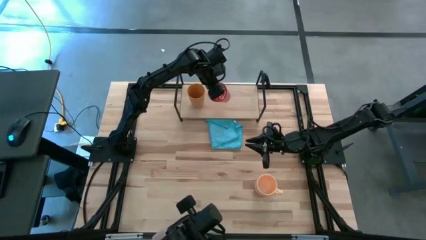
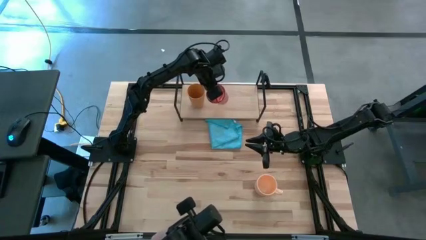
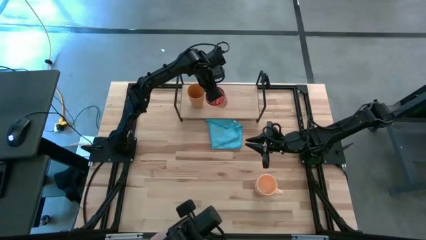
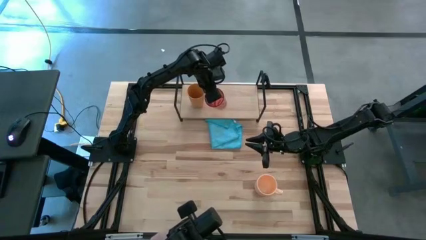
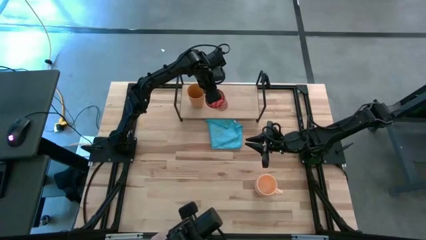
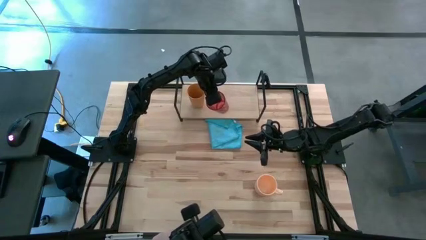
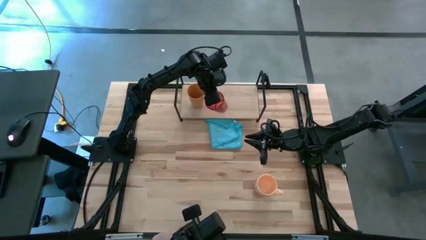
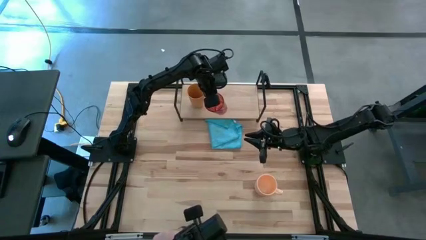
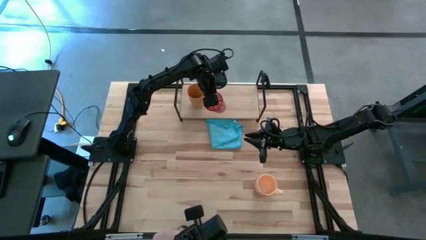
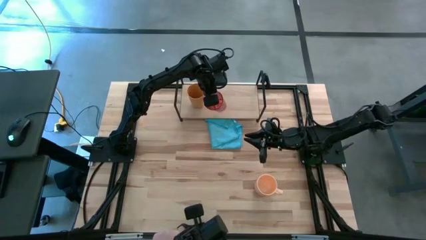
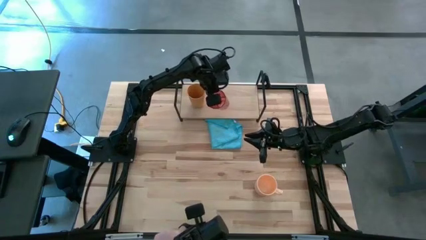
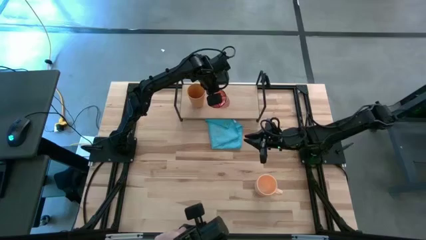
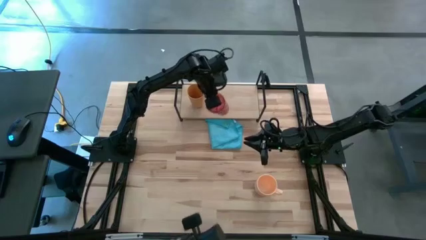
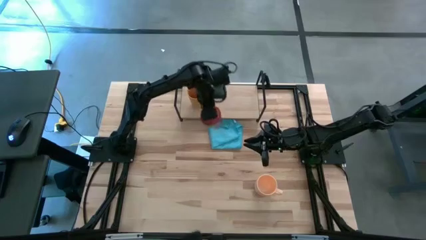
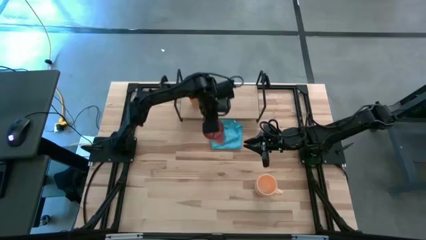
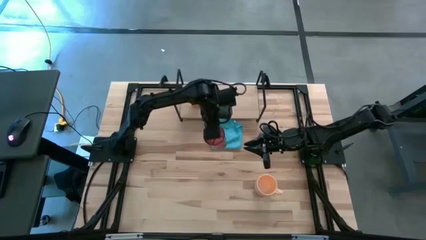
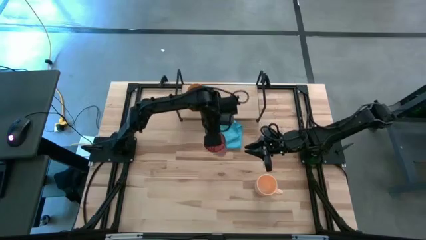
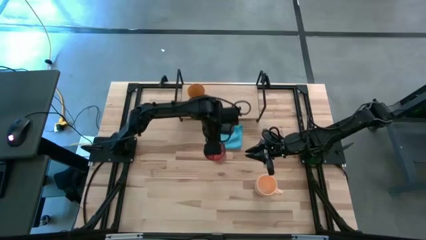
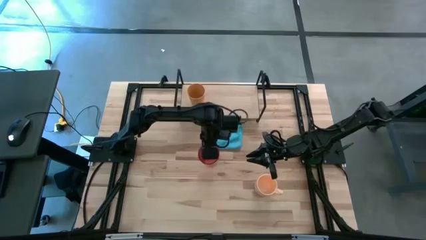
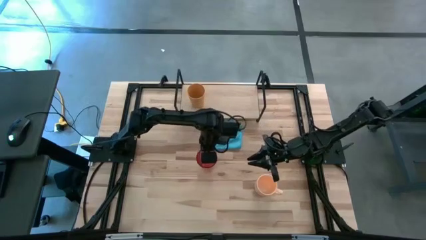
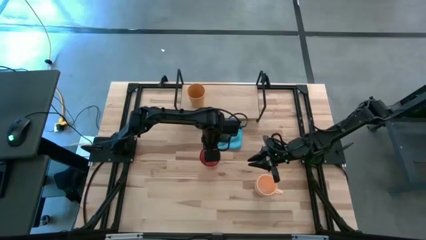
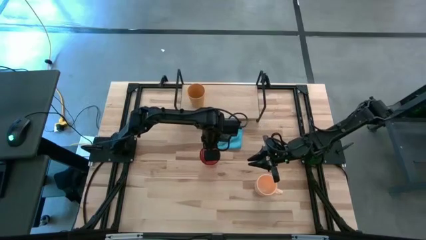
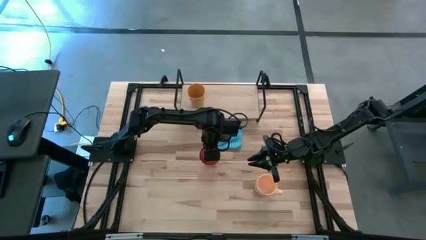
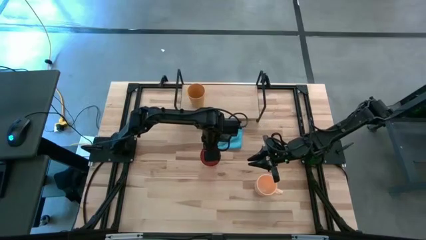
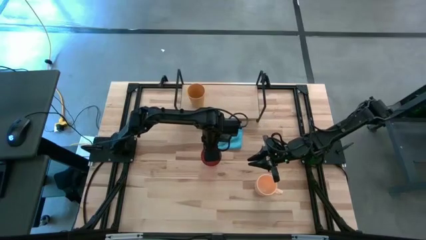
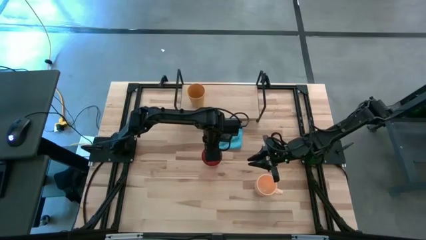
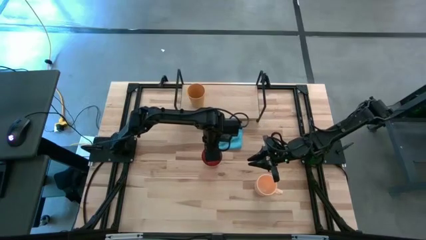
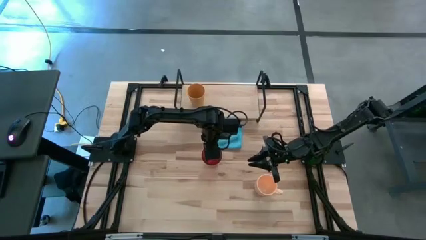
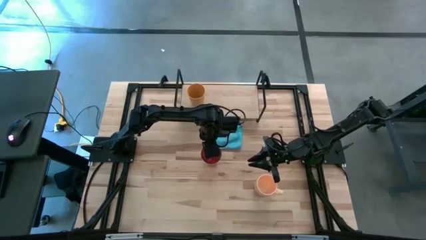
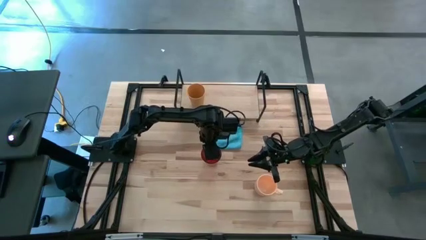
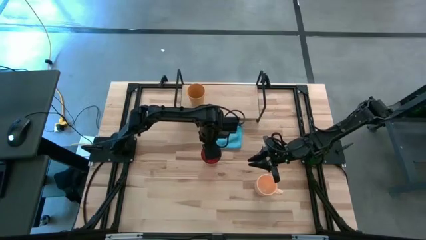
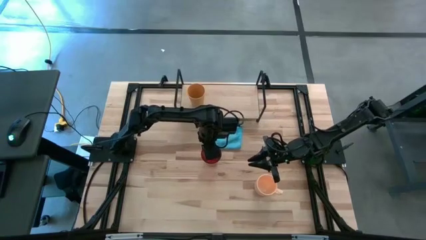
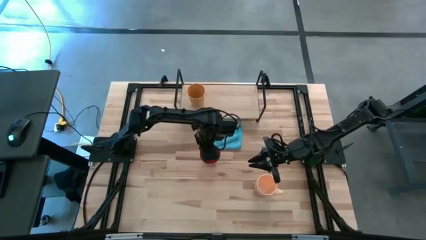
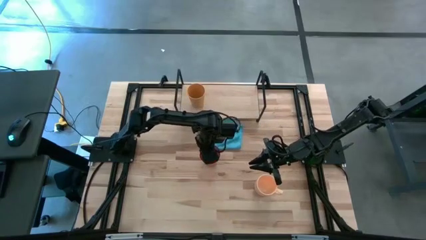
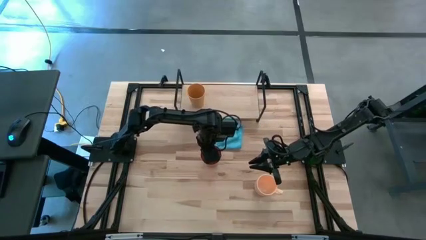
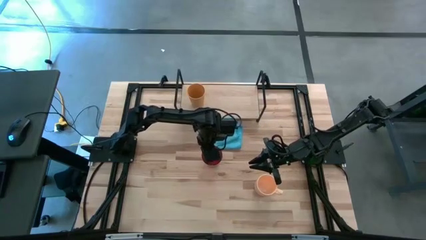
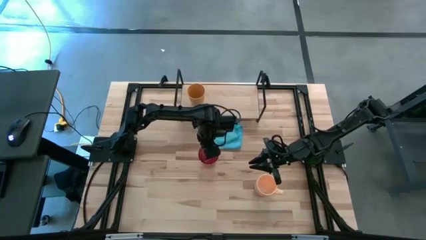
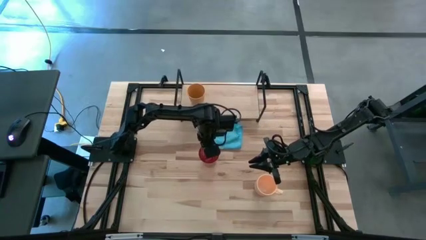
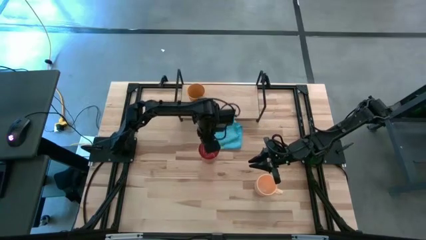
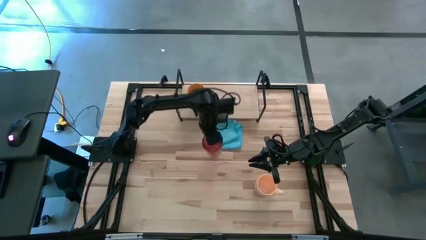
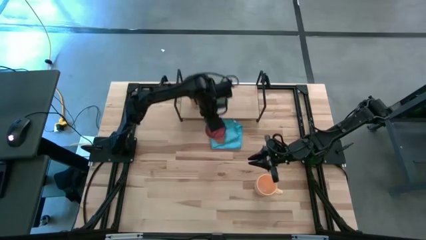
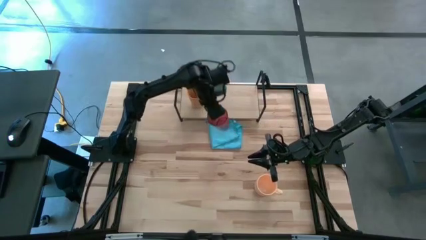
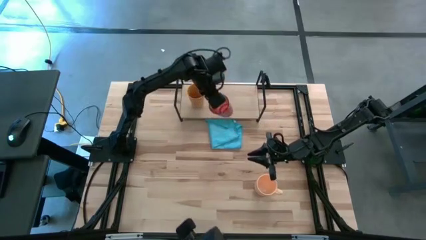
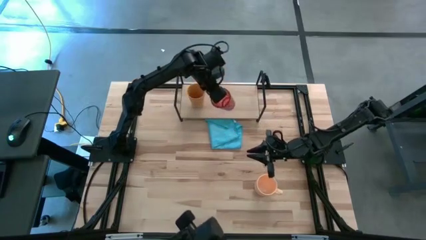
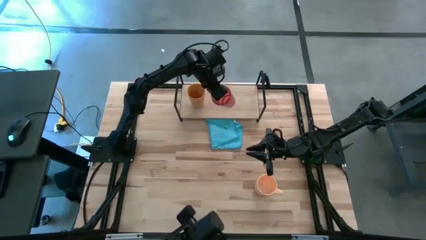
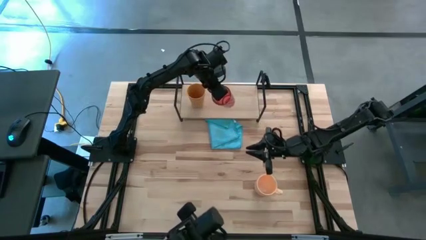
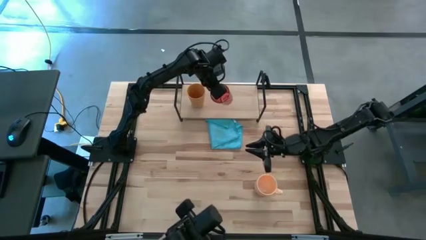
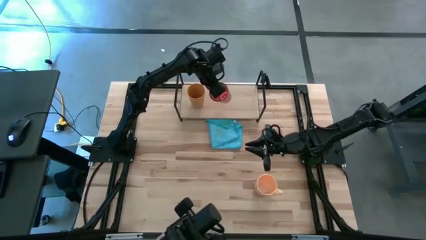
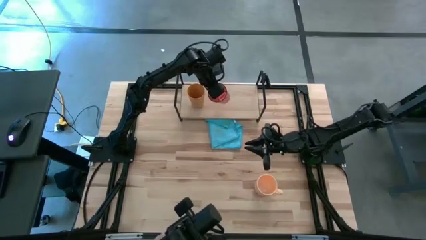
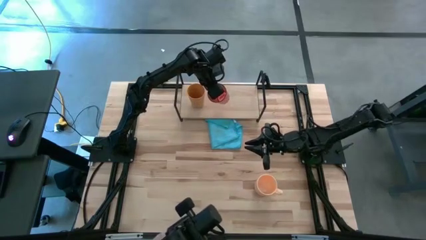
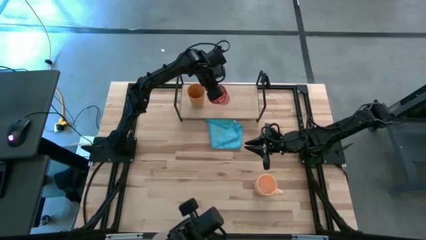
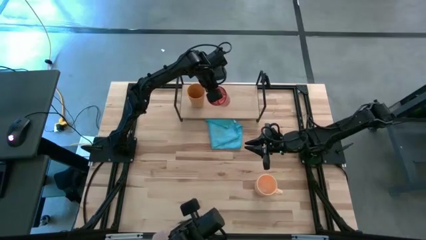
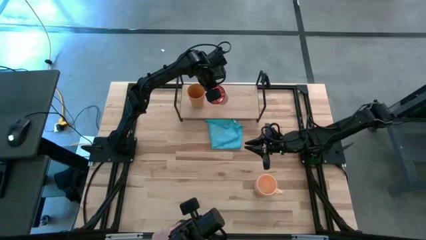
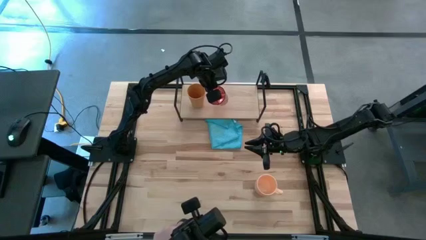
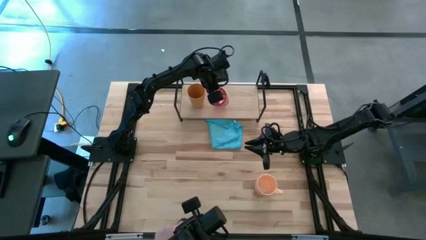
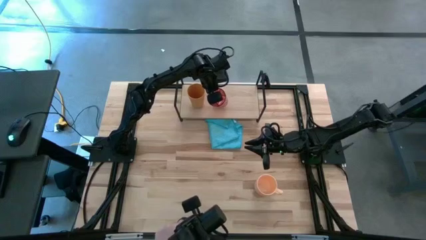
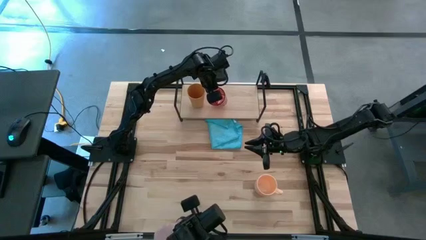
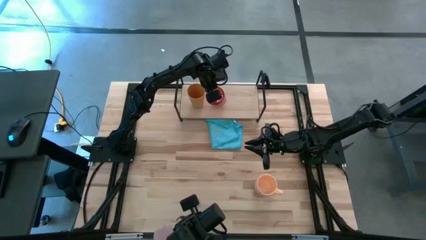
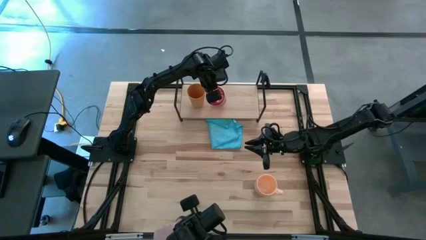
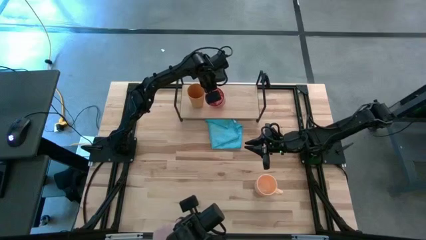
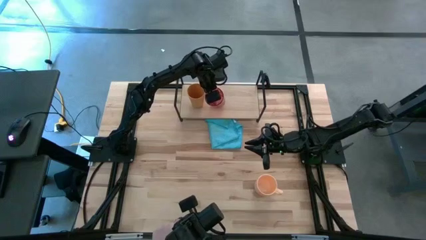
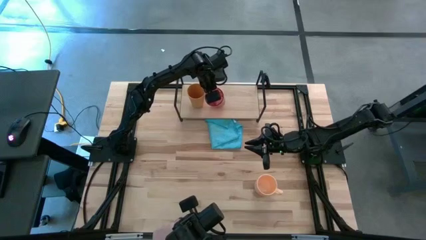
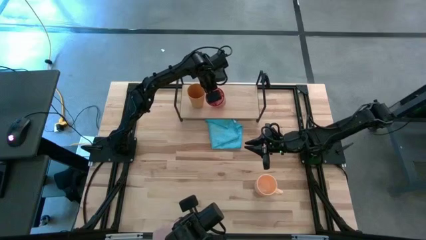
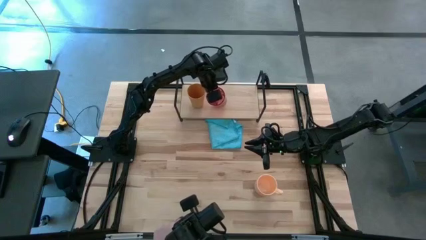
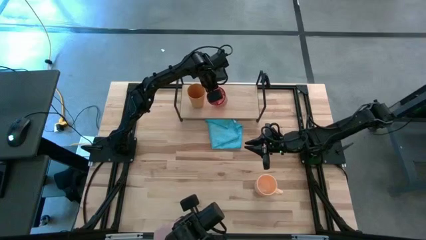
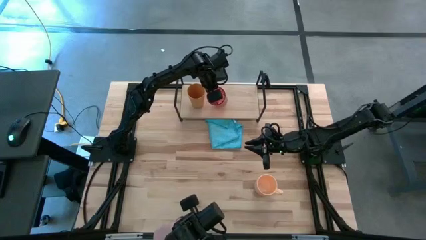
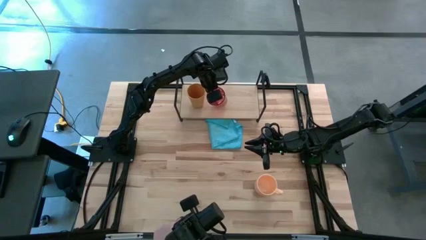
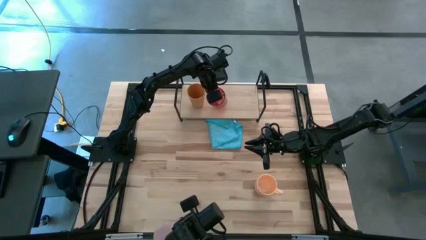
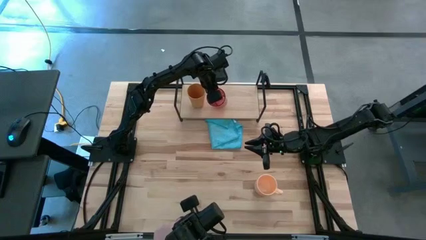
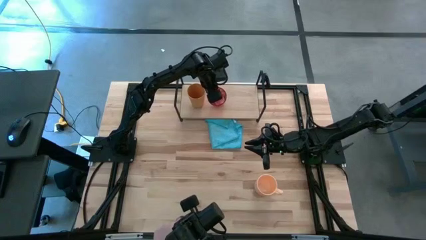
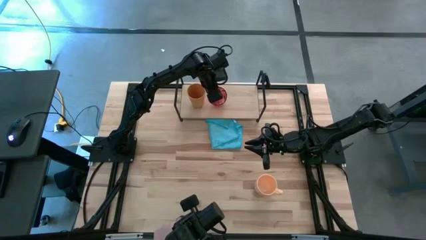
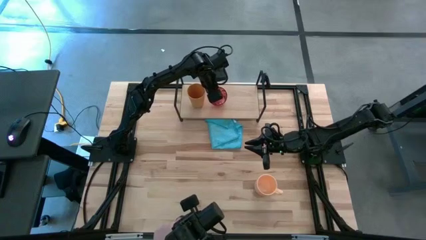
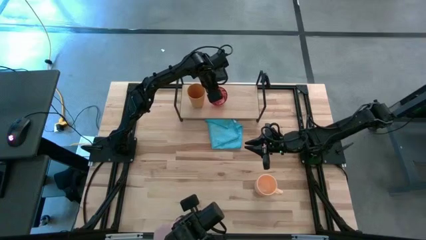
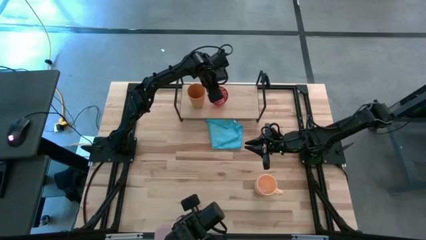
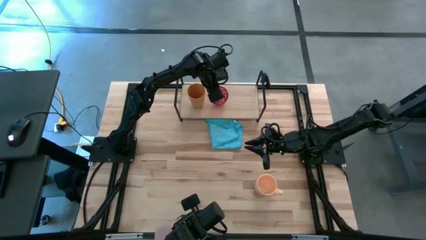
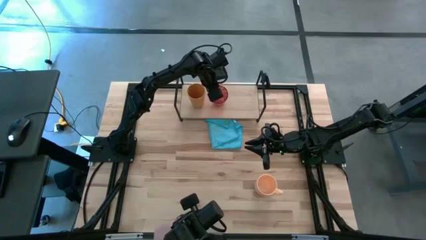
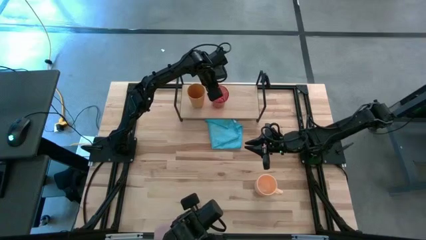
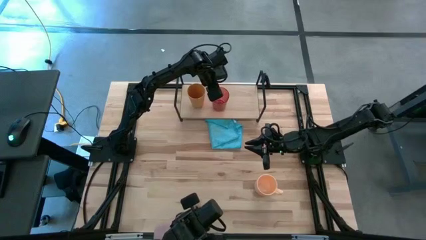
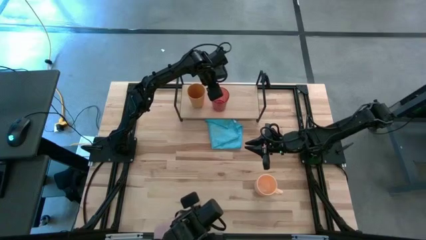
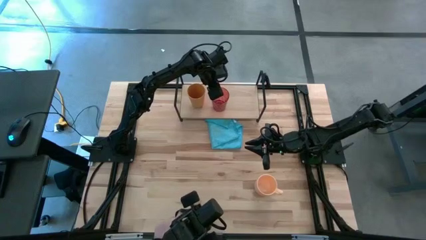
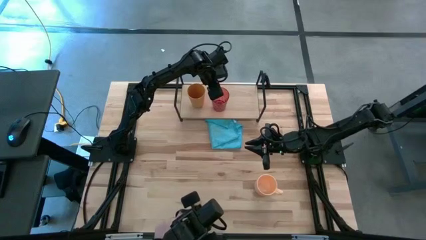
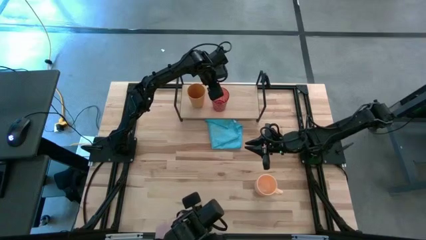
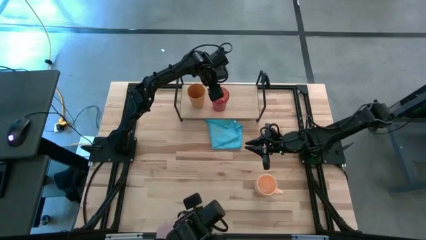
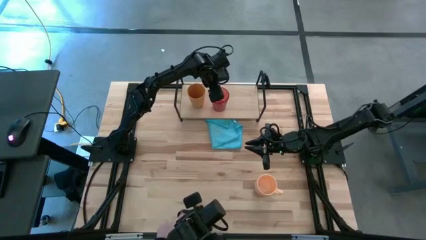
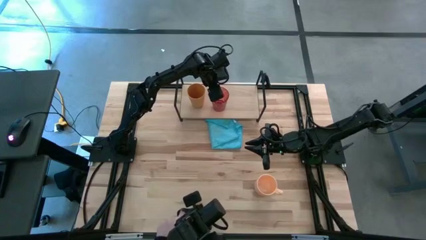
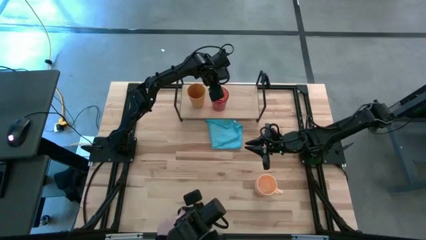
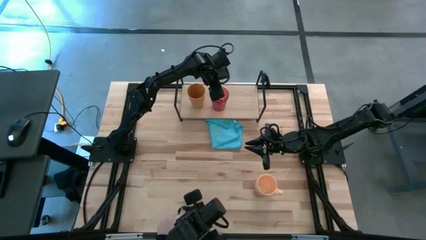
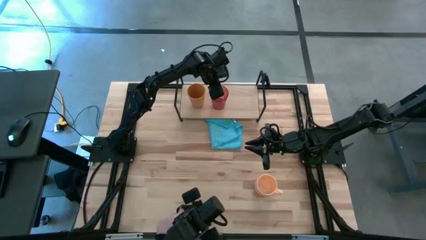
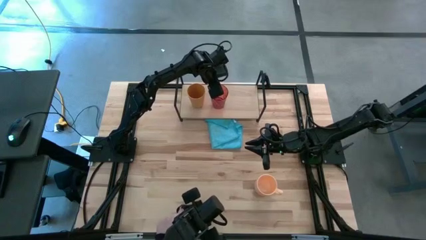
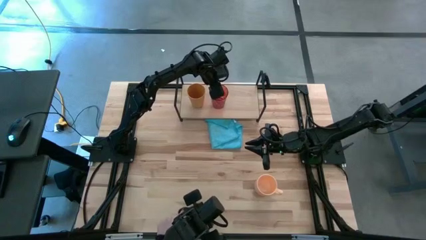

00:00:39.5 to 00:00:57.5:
Task: Stack small to large cups/mugs on shelf
Put the orange cup on the shelf
